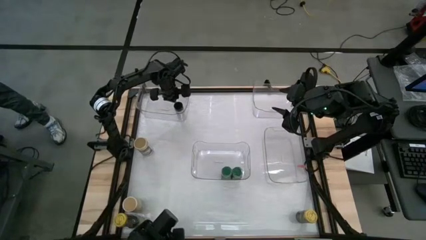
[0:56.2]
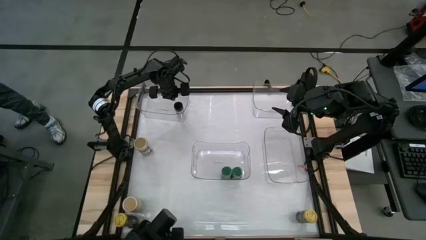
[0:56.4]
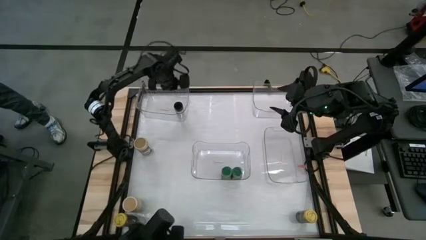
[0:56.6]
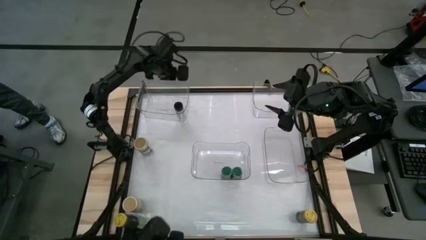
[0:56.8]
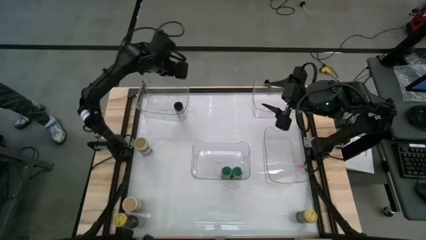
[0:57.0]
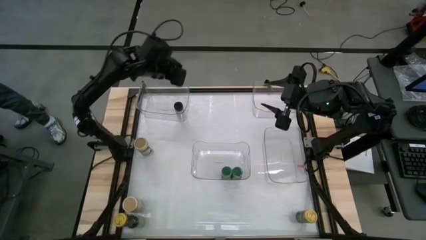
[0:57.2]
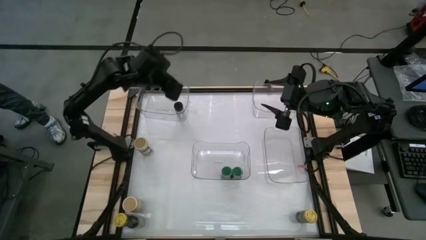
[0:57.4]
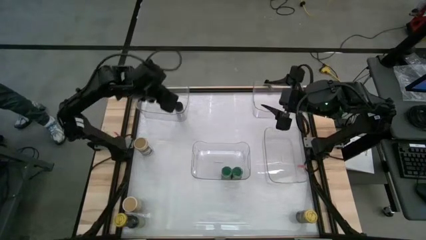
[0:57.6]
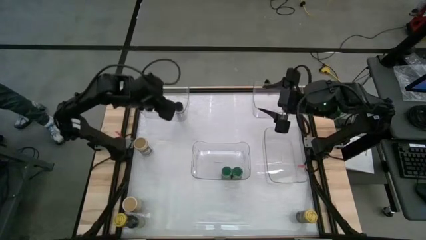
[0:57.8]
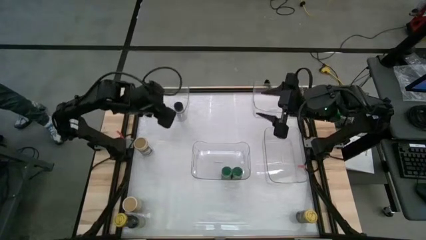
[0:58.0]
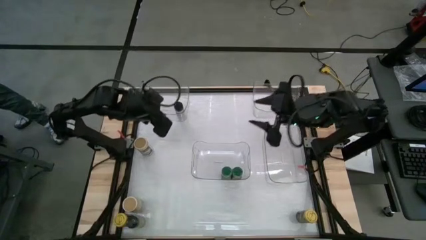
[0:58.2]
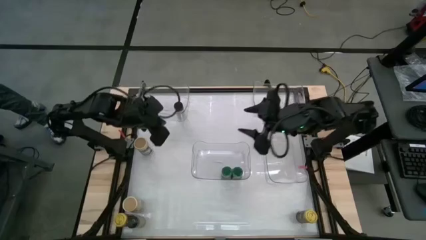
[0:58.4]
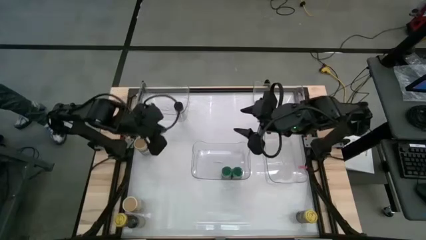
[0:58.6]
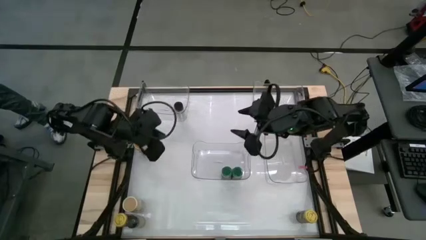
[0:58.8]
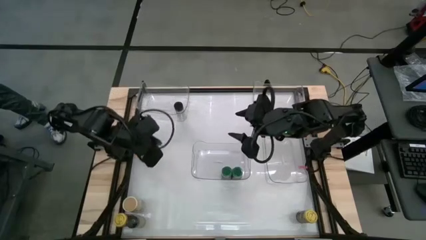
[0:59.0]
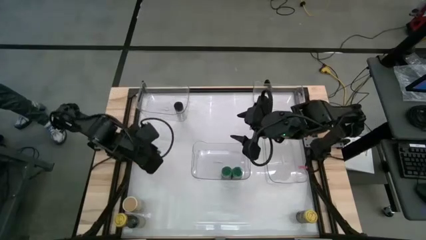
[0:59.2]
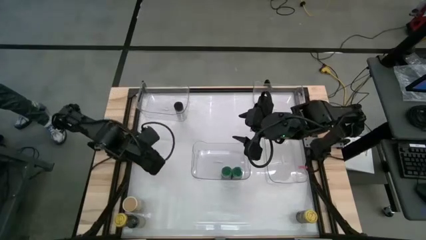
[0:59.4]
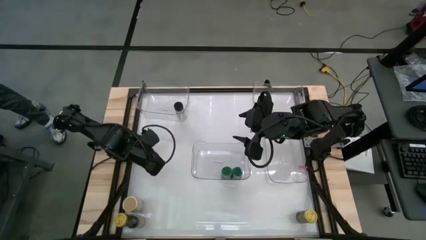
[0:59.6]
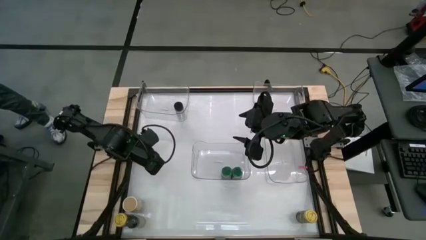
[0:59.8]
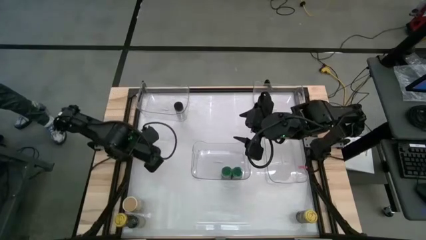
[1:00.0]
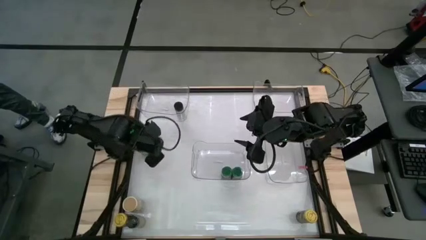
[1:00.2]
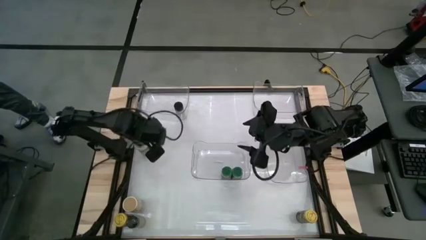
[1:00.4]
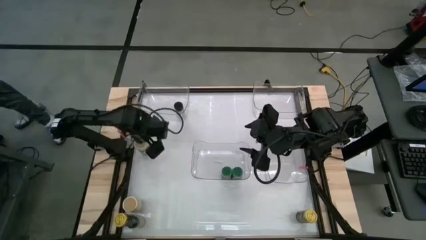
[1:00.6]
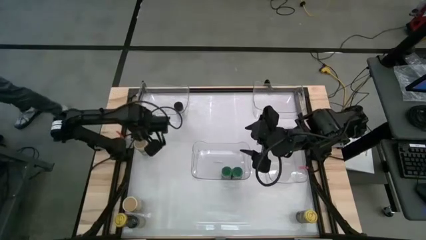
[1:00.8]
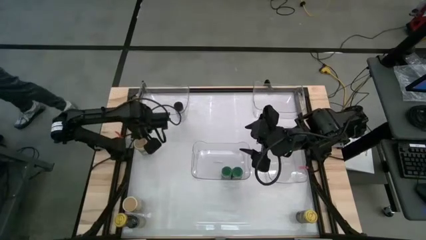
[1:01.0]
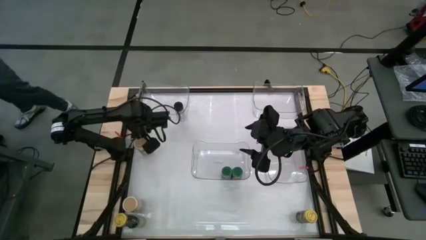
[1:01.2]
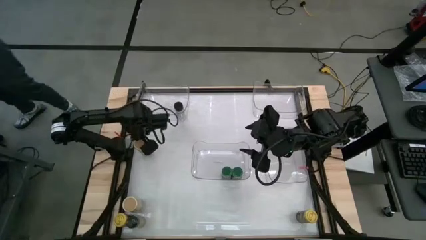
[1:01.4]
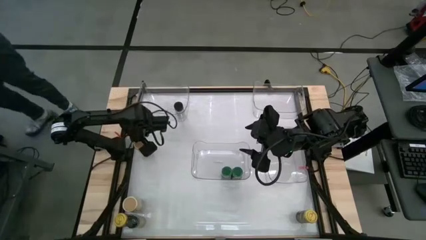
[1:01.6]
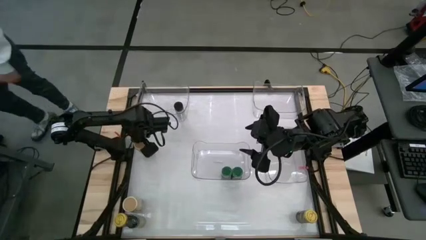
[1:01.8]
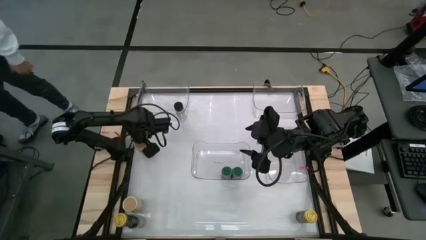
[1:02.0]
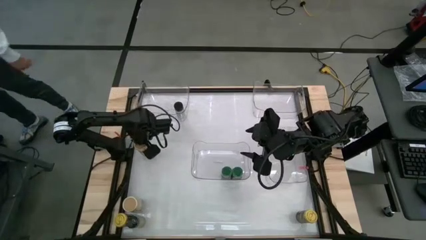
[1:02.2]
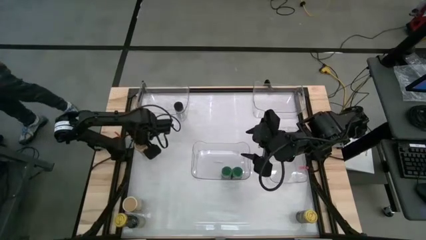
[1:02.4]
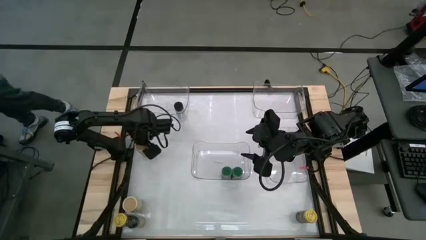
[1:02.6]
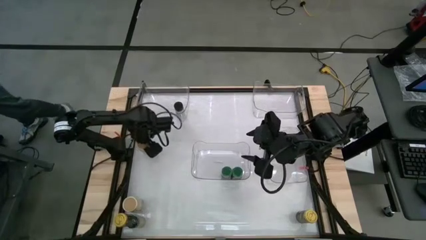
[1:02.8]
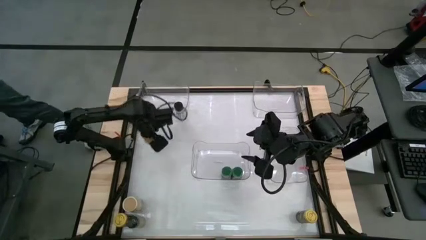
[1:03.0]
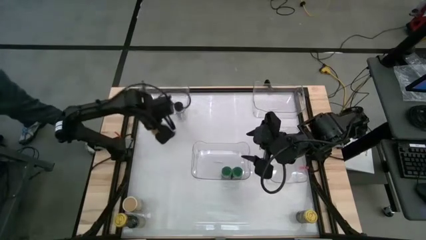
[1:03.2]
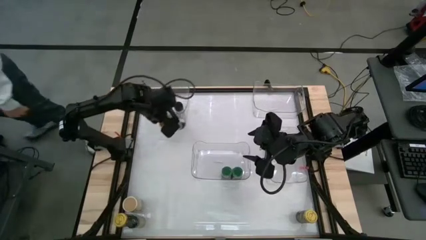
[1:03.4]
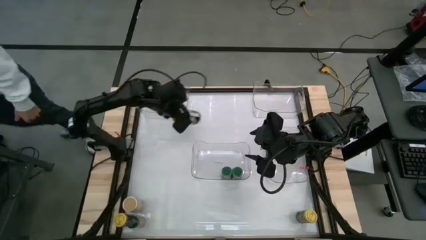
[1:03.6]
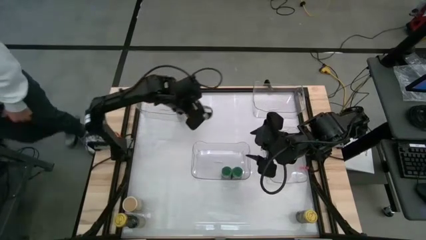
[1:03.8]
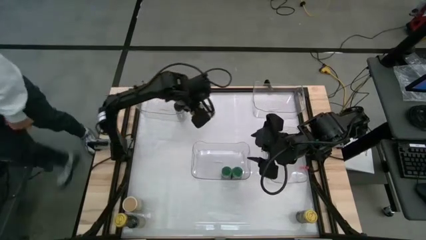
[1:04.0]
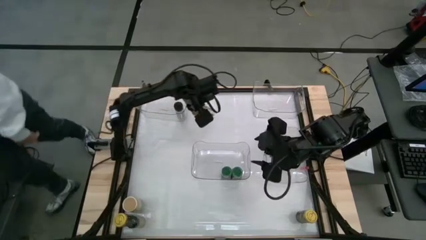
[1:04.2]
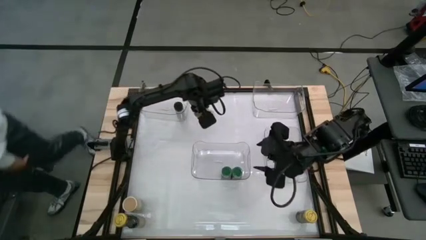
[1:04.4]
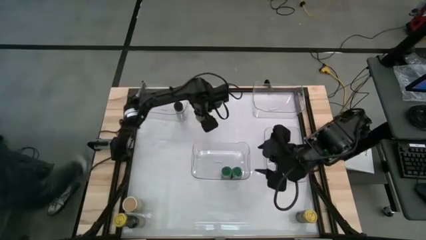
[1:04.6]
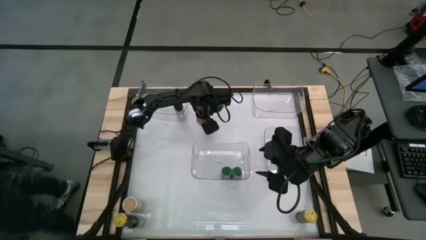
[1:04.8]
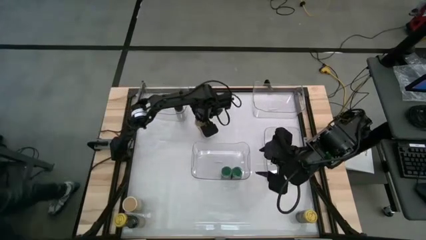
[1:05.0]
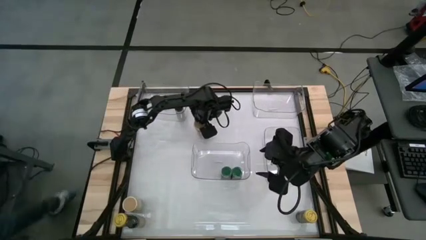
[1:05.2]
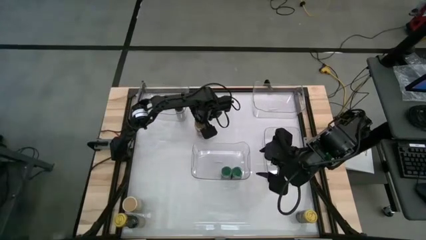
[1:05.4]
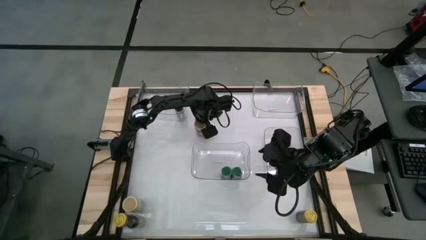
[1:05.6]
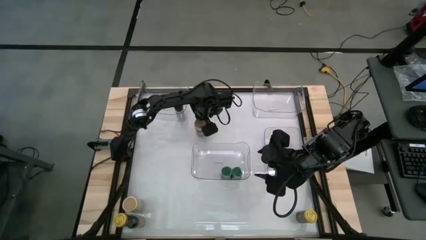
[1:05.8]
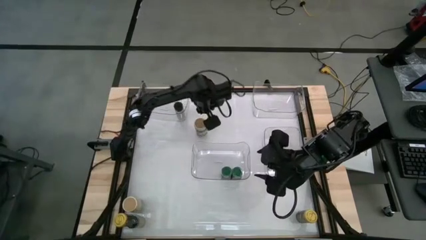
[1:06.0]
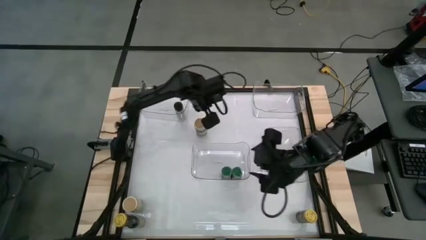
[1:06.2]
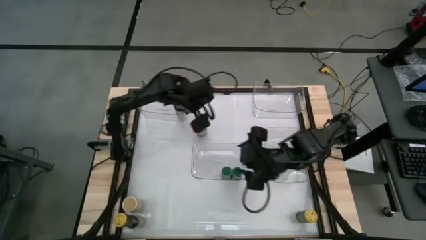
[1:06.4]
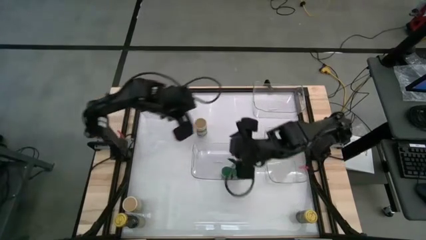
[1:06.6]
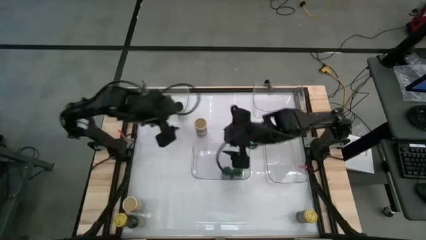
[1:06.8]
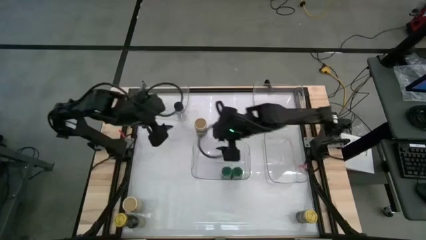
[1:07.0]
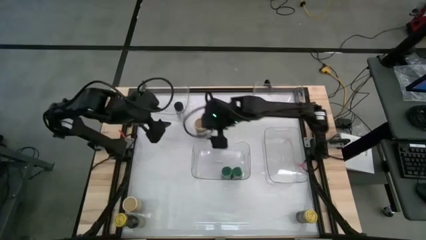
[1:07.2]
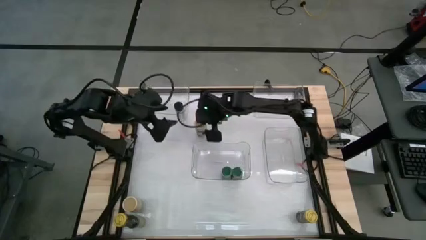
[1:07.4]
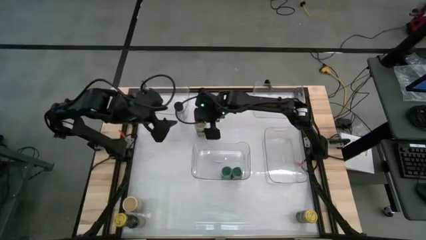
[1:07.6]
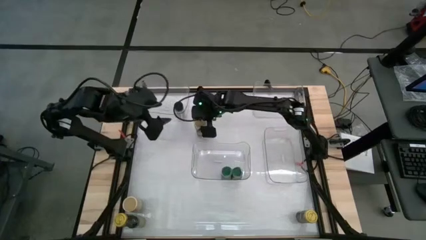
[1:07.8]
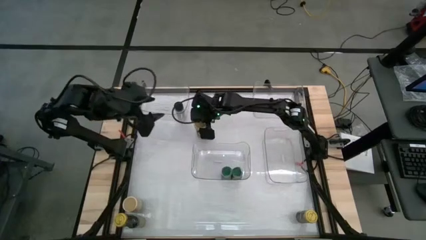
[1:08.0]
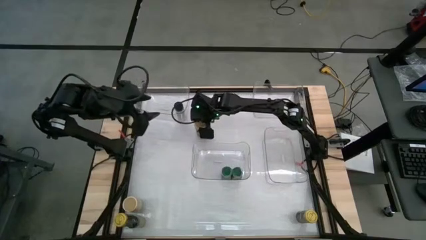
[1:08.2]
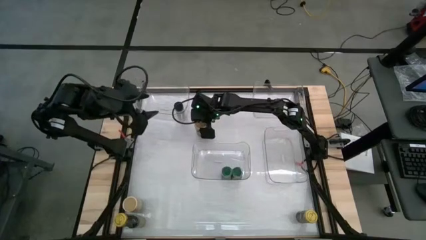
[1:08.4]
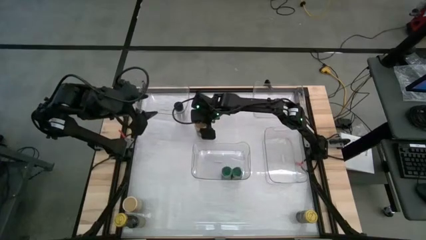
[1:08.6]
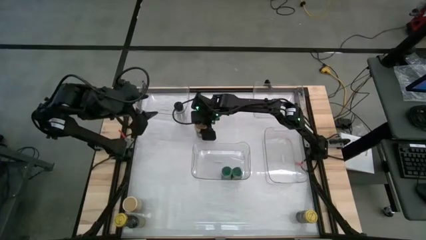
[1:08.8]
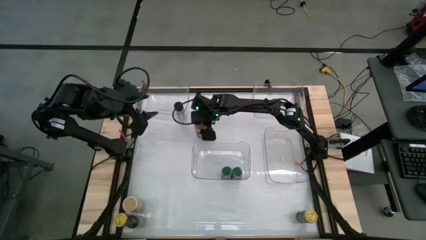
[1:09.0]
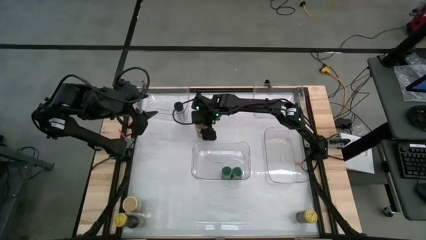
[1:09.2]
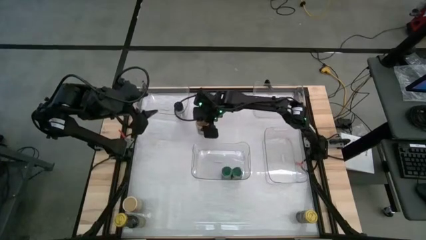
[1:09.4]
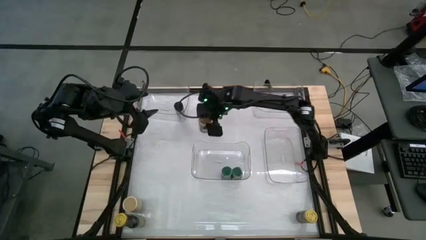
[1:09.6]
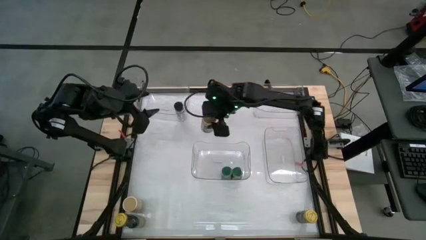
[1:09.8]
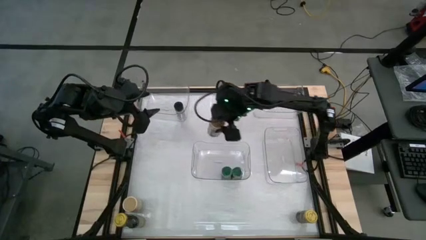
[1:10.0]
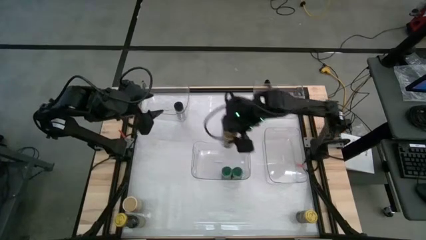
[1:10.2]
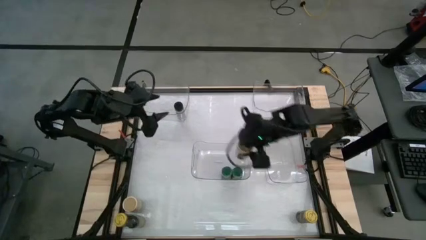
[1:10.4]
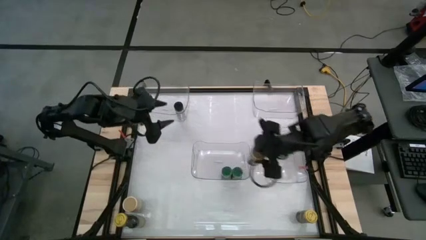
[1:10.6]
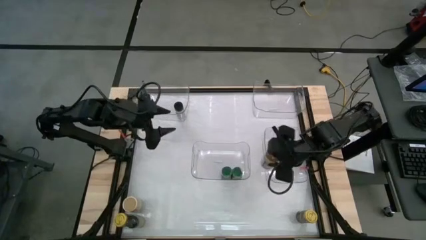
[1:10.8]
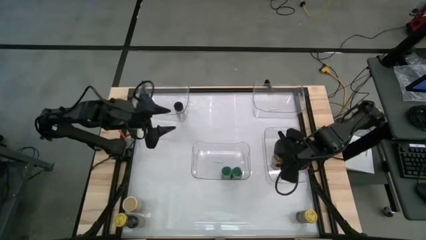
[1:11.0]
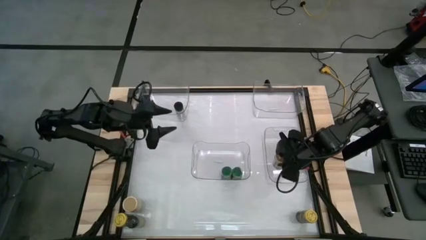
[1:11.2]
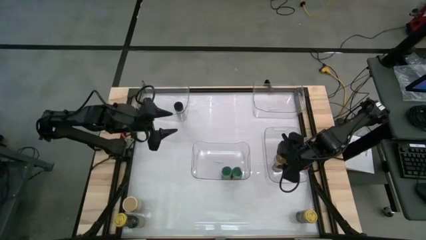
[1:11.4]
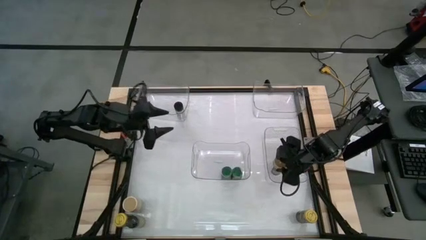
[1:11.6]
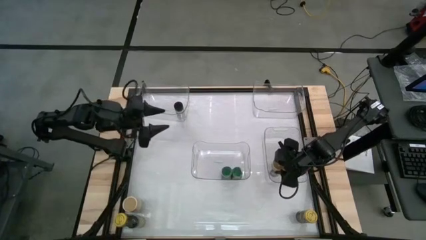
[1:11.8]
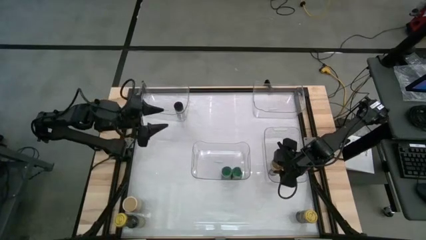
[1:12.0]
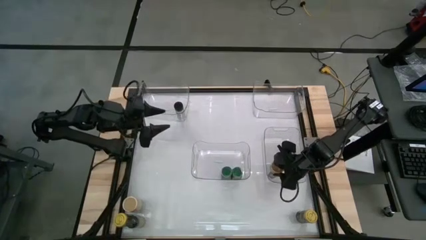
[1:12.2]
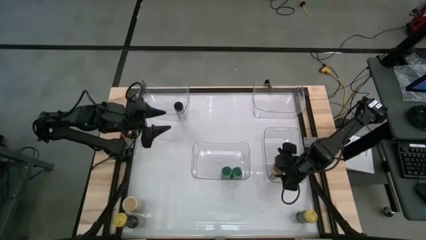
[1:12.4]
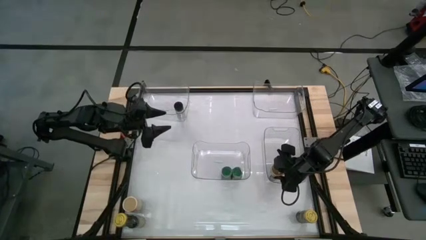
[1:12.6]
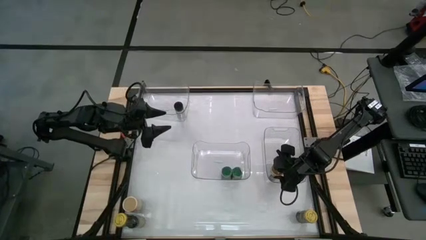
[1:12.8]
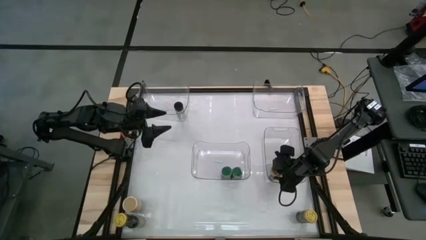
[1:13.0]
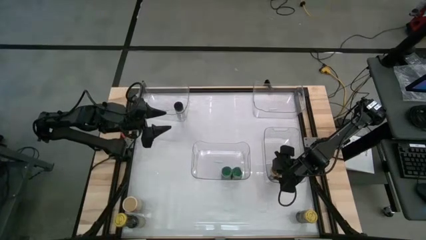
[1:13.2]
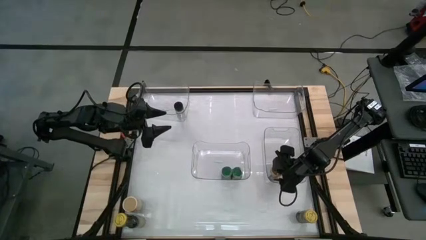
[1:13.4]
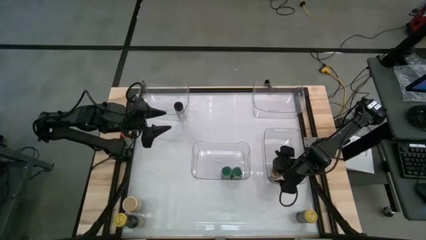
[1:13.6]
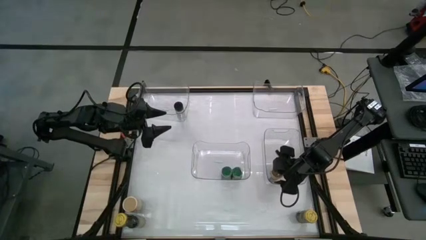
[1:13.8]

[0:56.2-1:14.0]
Task: Sort spices by type
Put the top gold seasoning bottle into the bottom right transparent bin
